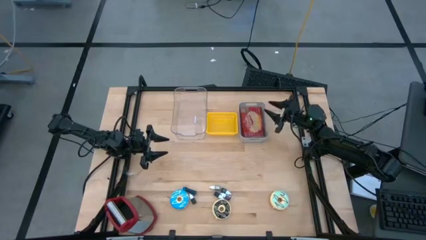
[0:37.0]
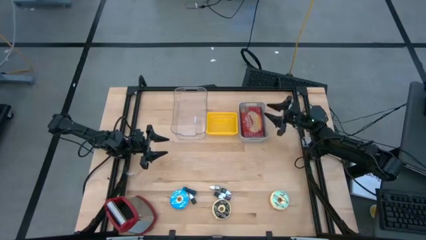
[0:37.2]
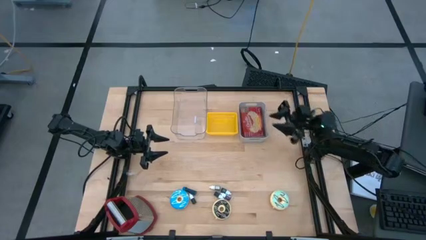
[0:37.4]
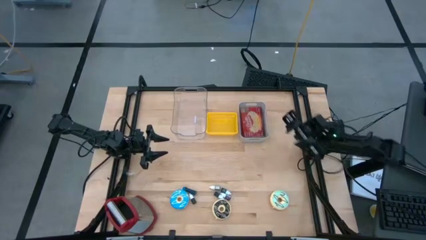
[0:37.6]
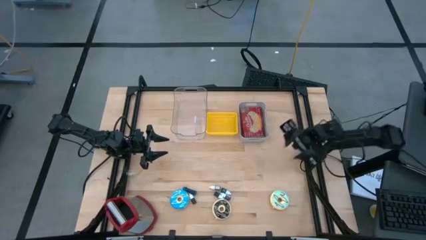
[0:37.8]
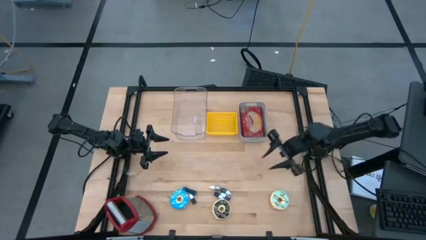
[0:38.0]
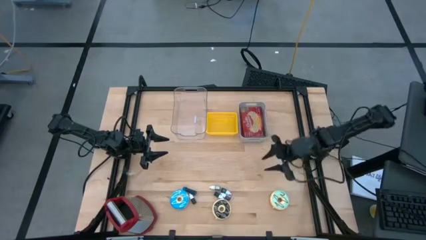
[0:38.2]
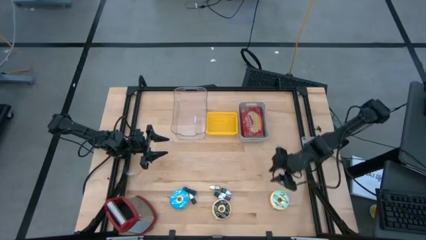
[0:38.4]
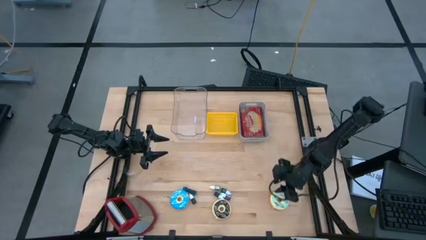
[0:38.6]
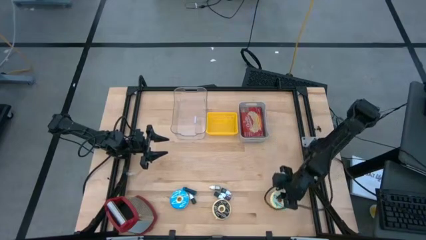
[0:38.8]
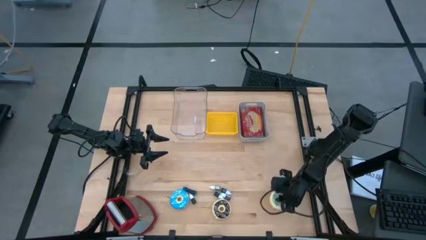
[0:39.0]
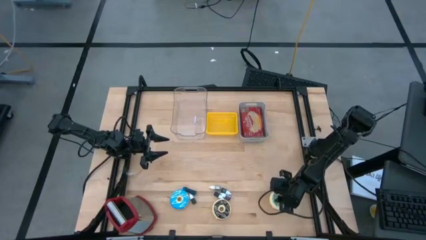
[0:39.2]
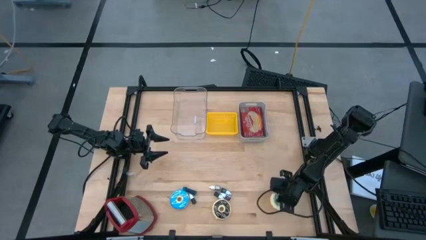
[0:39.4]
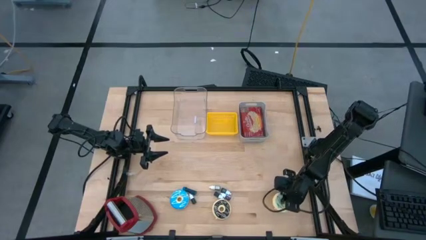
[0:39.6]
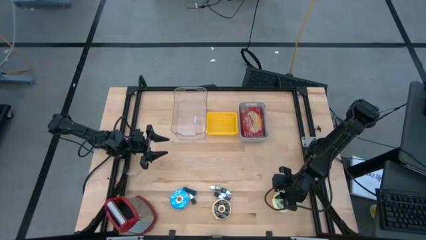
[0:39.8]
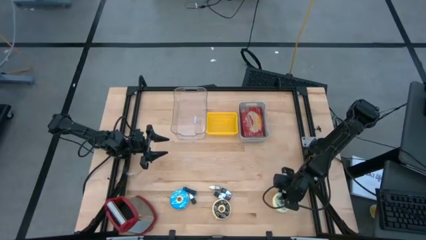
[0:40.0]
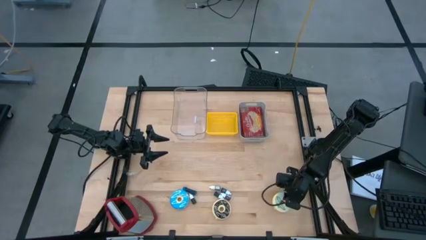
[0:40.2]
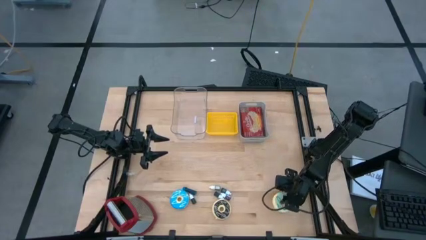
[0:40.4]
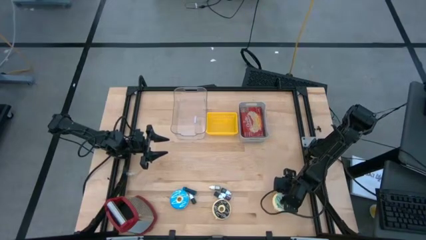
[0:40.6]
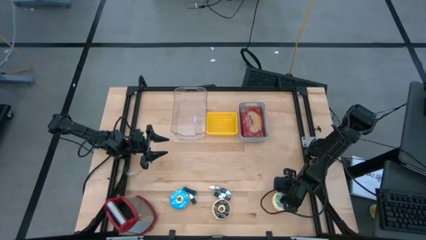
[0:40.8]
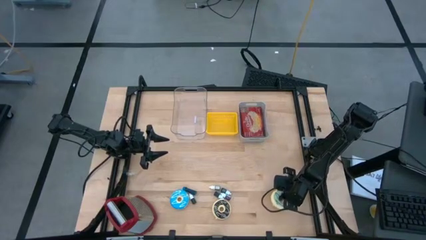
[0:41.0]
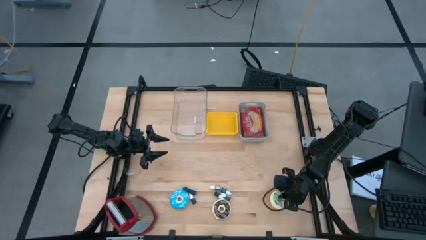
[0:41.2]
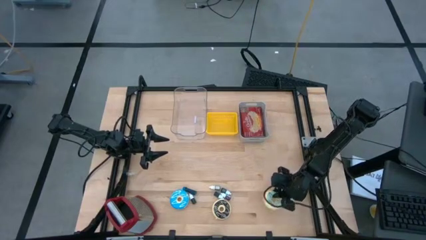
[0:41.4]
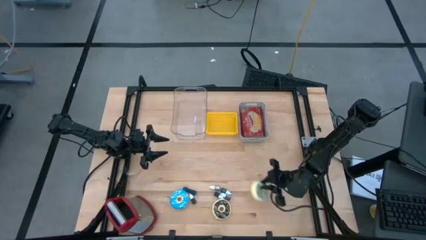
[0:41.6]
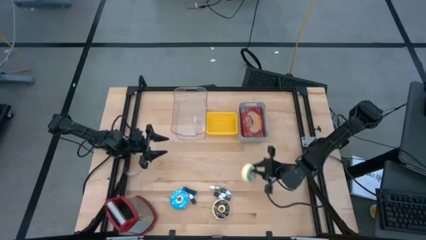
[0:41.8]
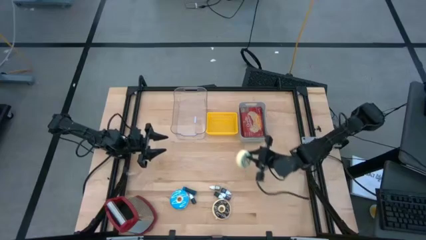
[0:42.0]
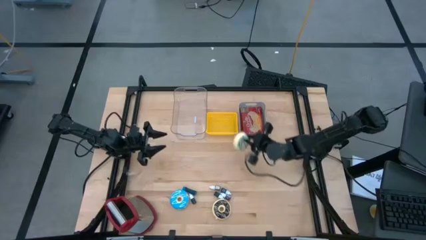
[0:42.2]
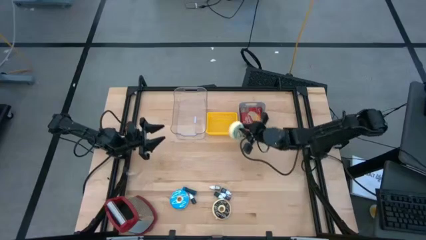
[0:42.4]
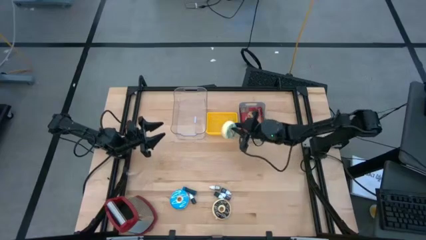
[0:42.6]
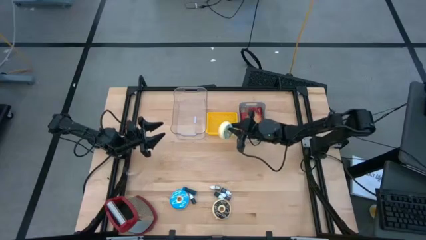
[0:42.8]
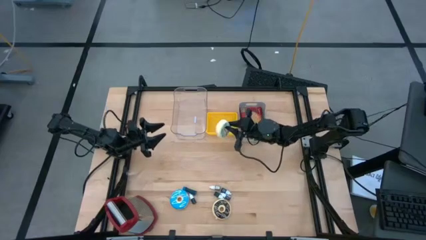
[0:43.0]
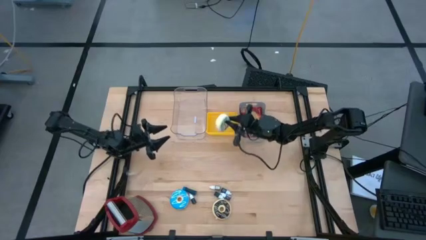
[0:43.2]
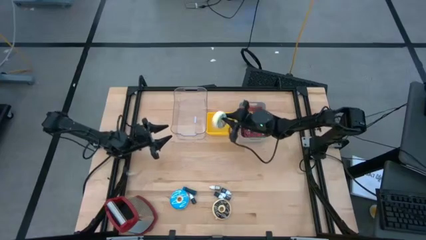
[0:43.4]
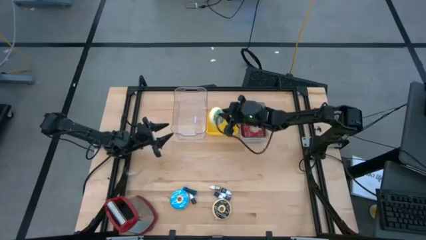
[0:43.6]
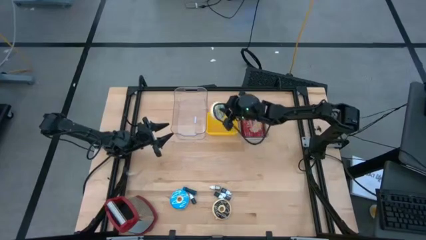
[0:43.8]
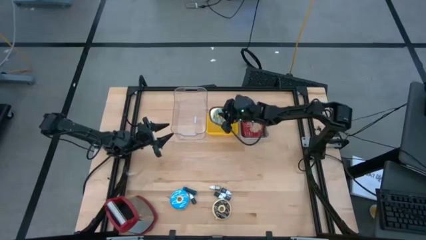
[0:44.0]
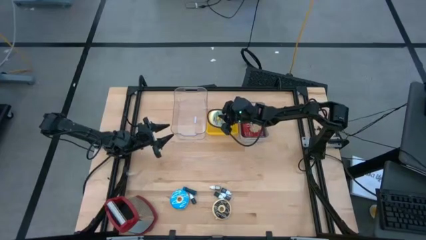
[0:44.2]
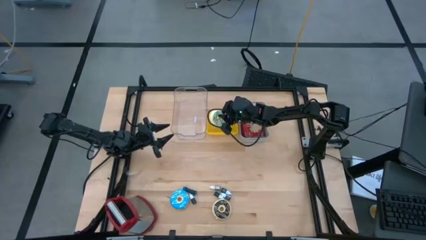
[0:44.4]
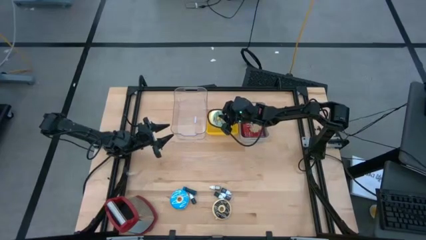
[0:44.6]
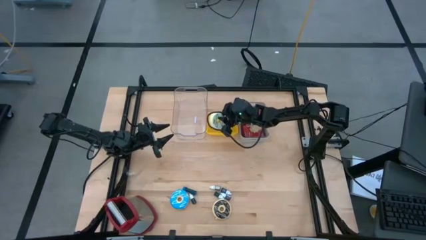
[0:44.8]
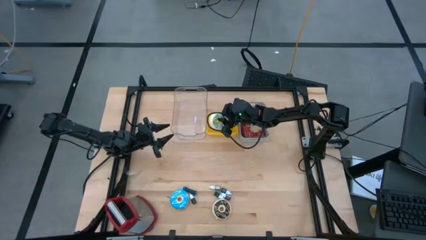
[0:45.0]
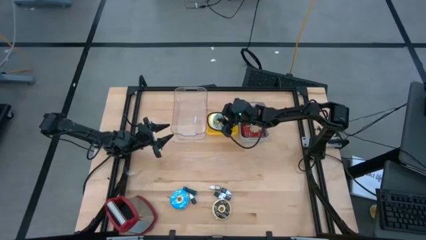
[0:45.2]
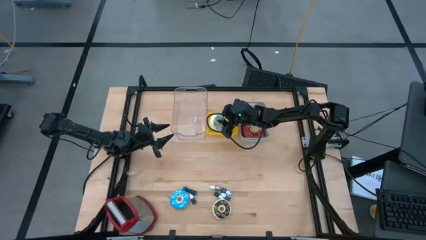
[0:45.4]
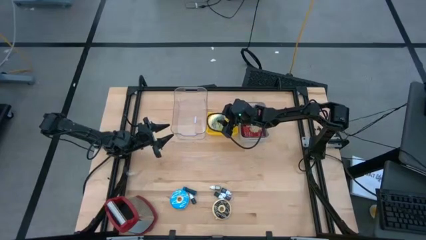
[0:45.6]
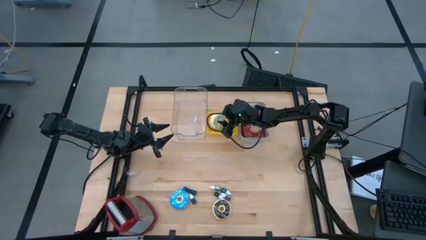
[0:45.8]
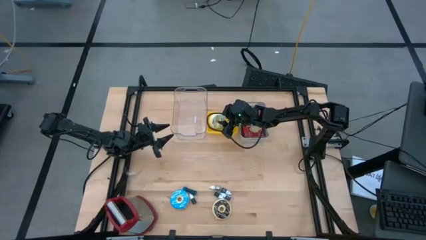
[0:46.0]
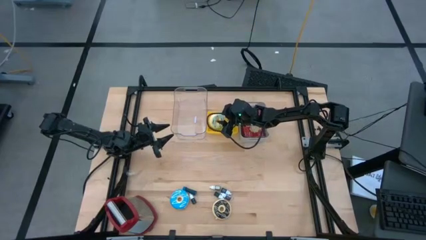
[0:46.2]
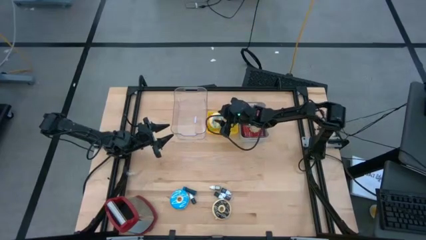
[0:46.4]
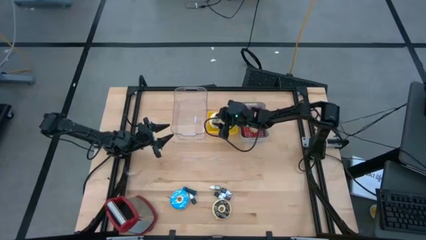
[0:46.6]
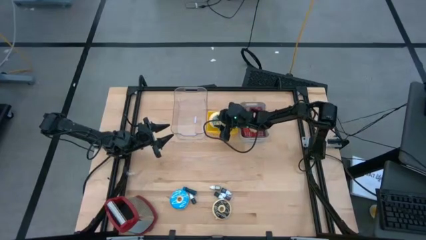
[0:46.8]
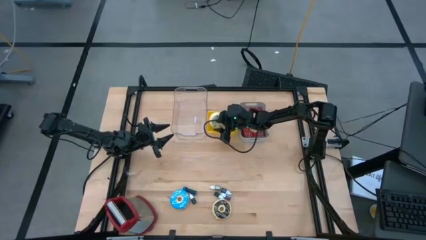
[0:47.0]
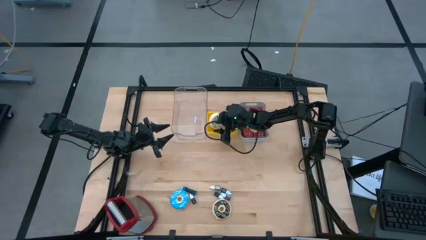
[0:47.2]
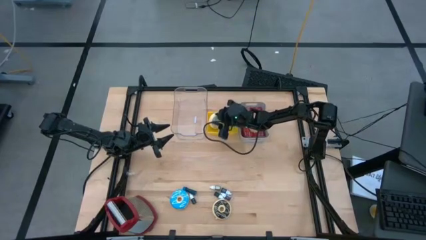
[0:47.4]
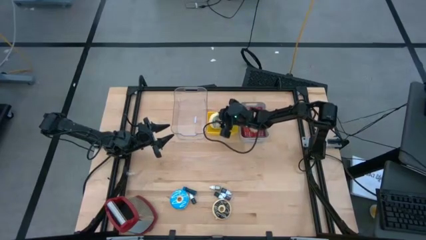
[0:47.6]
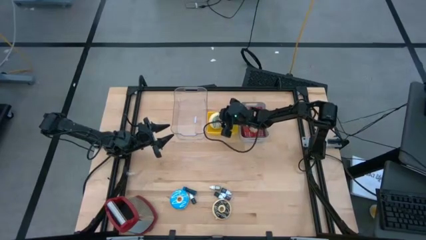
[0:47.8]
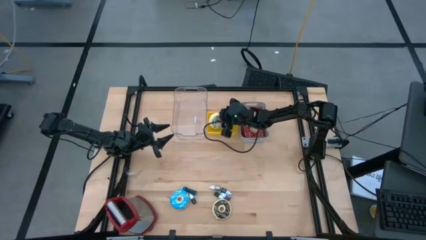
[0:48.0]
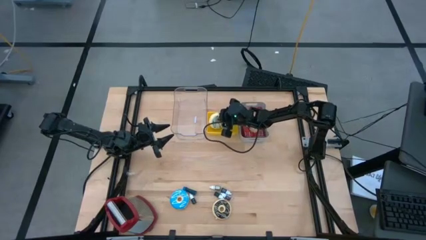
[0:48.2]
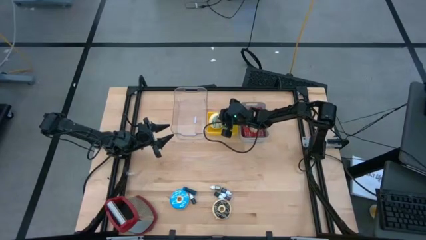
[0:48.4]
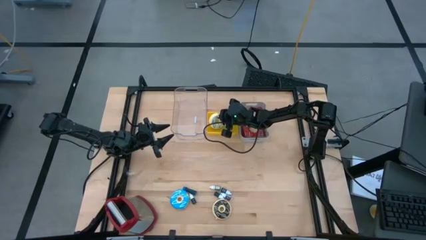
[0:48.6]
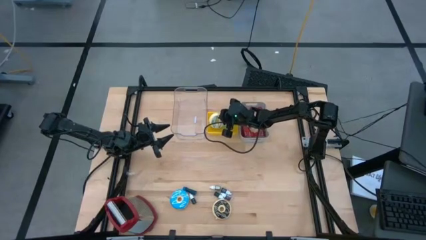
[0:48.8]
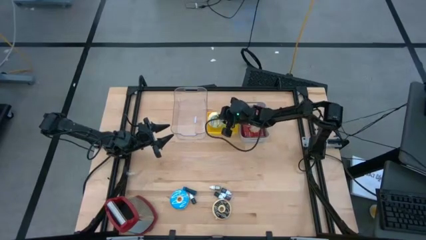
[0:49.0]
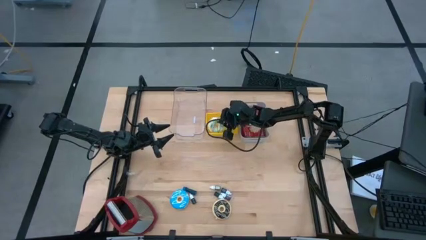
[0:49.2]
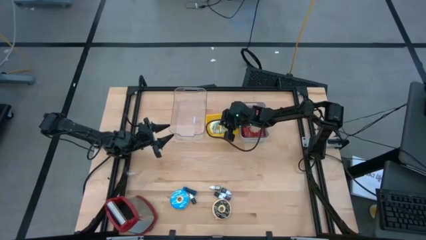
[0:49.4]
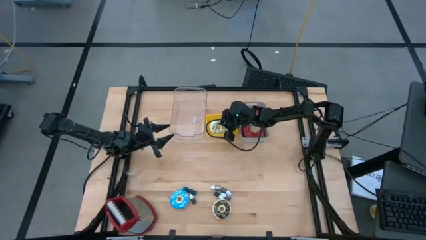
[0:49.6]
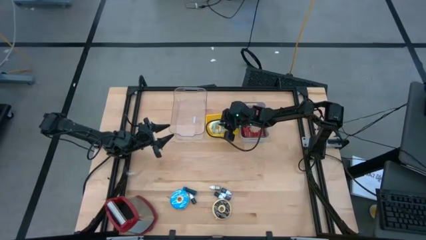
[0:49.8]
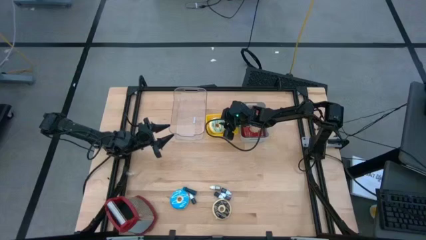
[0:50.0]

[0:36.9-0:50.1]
Put the green donut into the yellow bin
